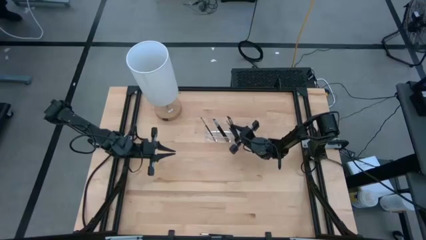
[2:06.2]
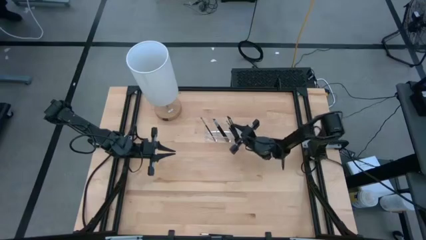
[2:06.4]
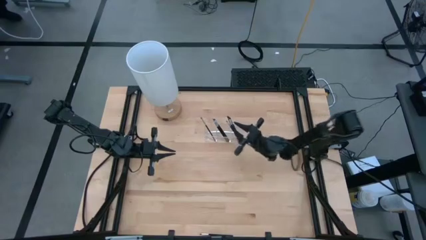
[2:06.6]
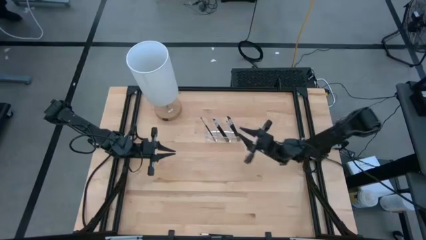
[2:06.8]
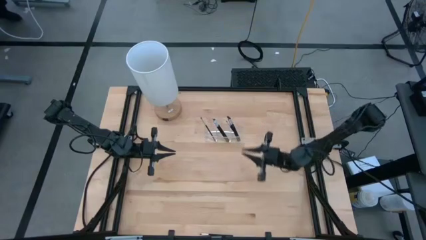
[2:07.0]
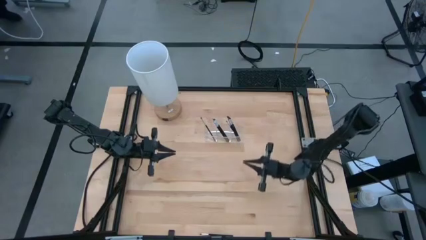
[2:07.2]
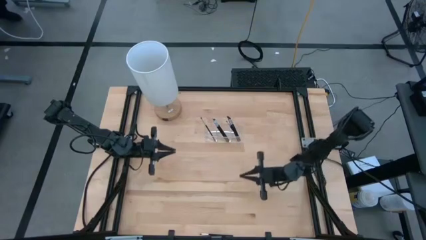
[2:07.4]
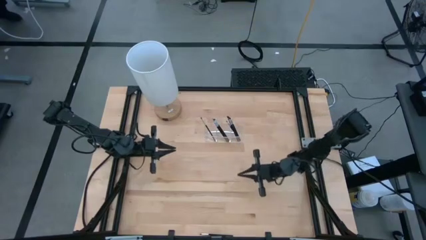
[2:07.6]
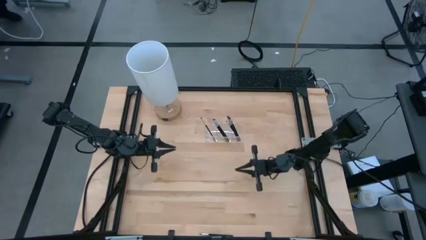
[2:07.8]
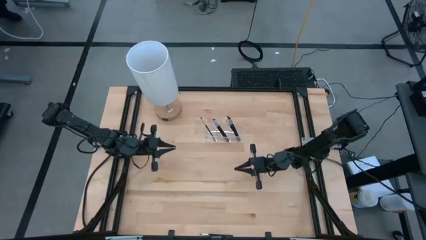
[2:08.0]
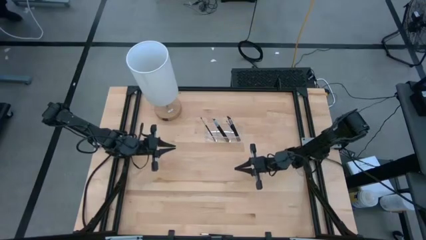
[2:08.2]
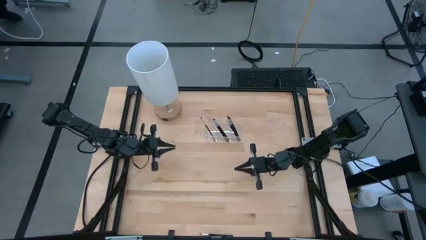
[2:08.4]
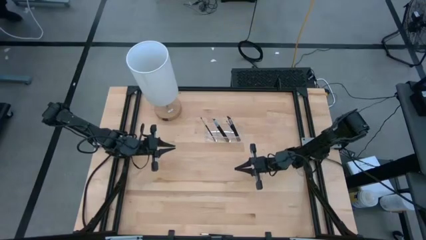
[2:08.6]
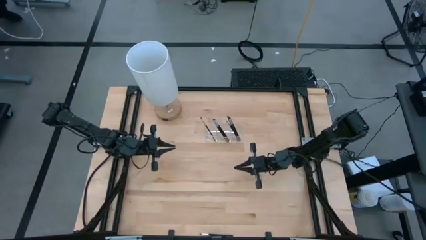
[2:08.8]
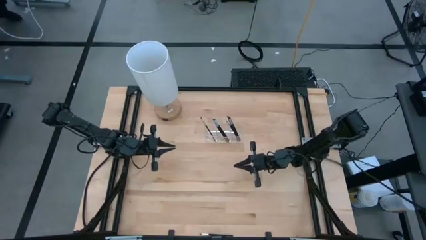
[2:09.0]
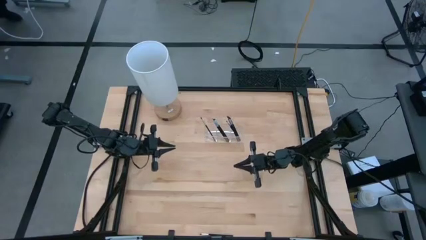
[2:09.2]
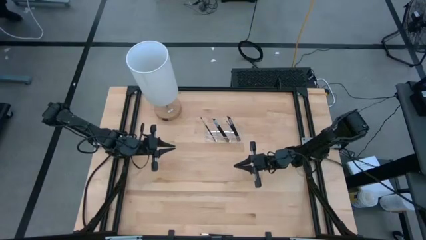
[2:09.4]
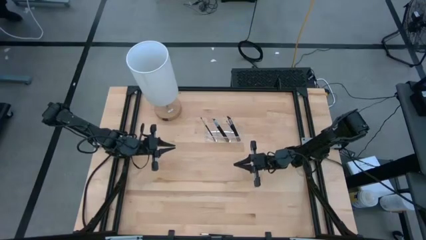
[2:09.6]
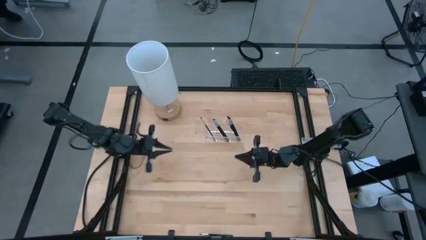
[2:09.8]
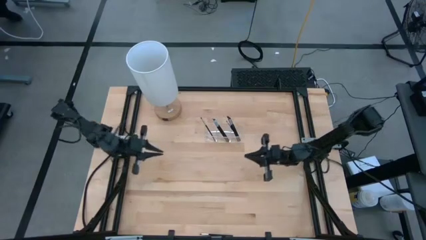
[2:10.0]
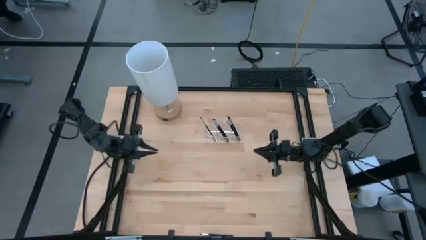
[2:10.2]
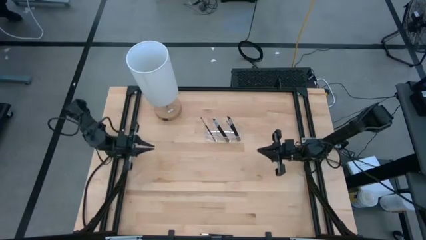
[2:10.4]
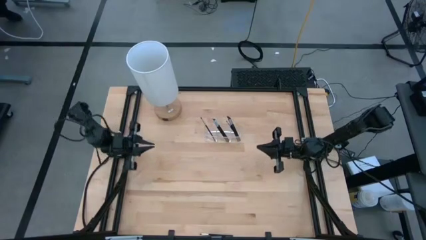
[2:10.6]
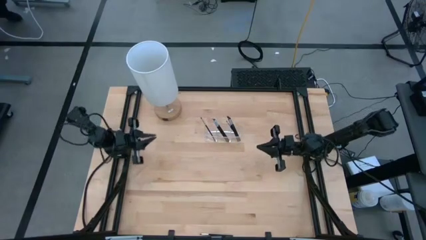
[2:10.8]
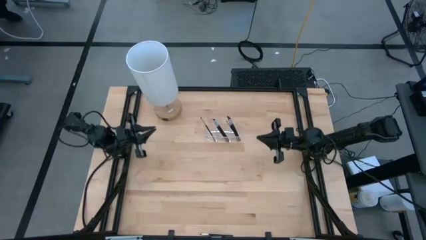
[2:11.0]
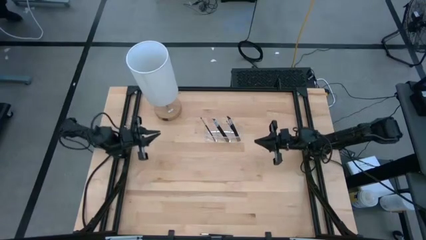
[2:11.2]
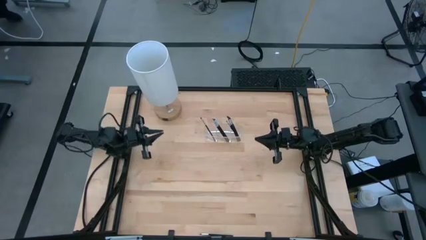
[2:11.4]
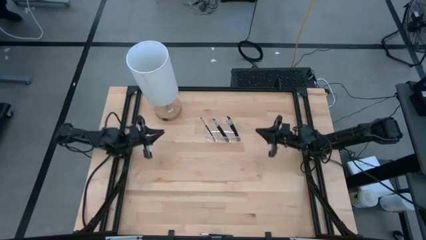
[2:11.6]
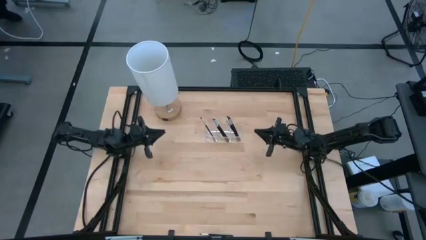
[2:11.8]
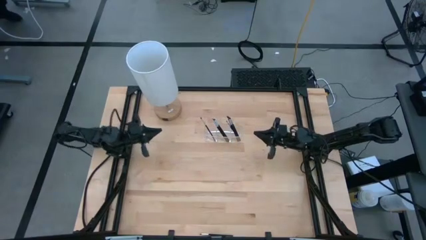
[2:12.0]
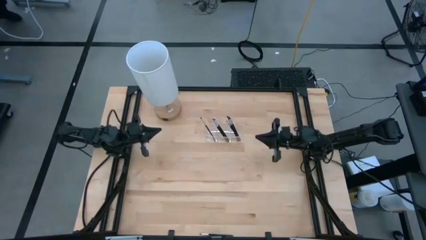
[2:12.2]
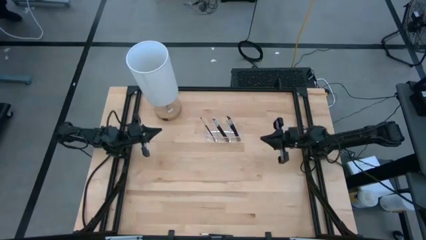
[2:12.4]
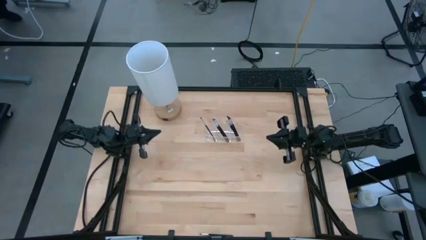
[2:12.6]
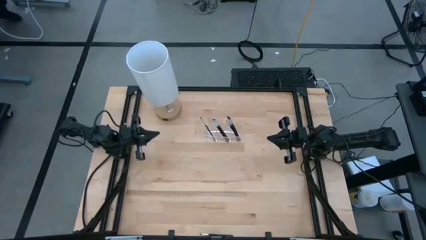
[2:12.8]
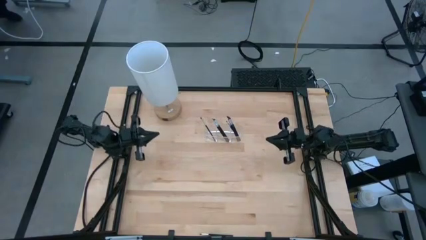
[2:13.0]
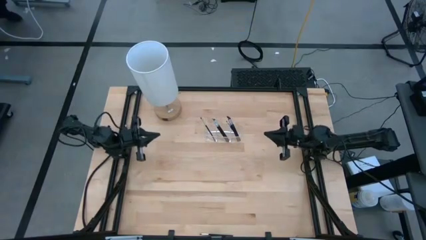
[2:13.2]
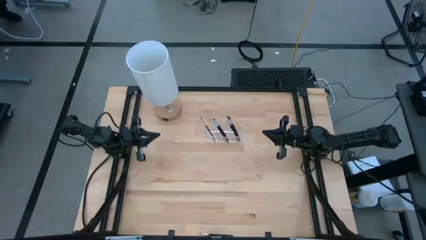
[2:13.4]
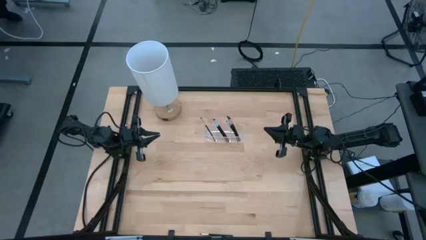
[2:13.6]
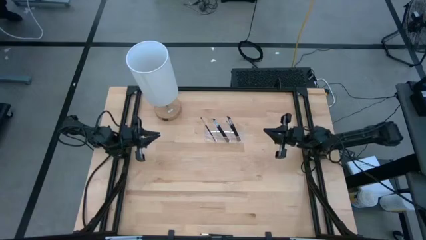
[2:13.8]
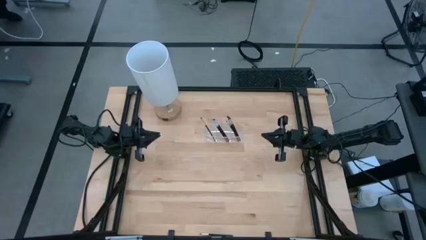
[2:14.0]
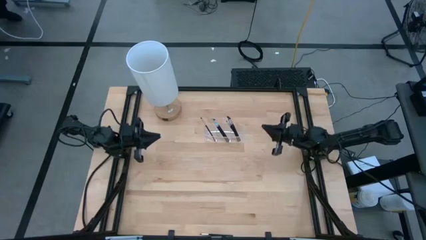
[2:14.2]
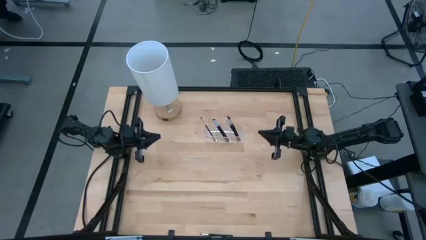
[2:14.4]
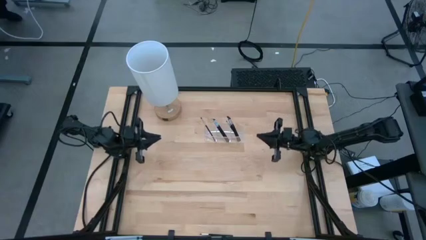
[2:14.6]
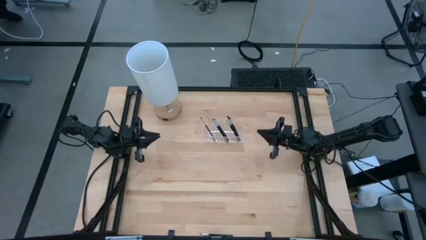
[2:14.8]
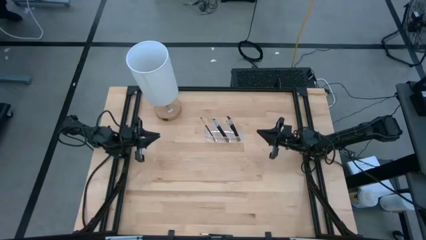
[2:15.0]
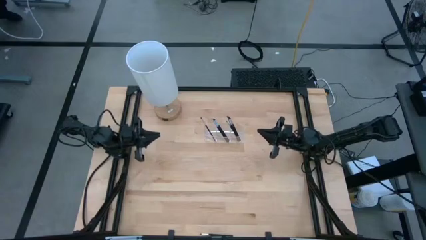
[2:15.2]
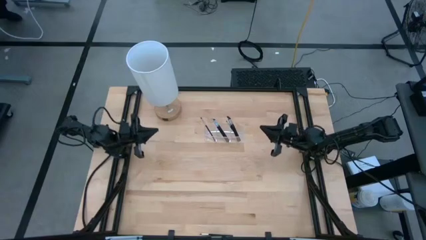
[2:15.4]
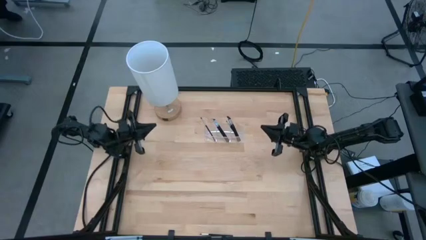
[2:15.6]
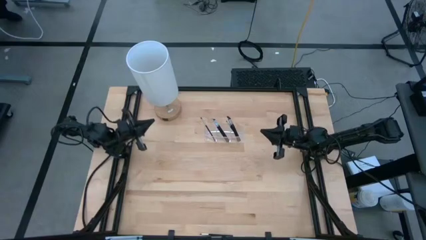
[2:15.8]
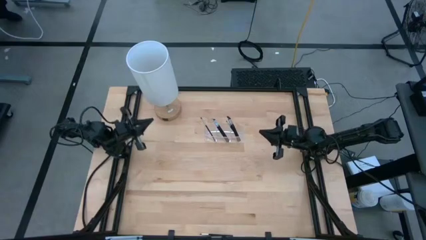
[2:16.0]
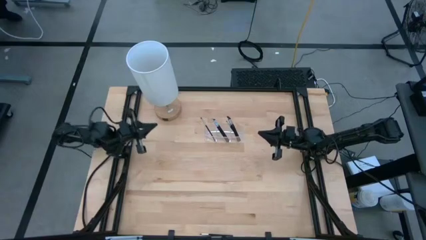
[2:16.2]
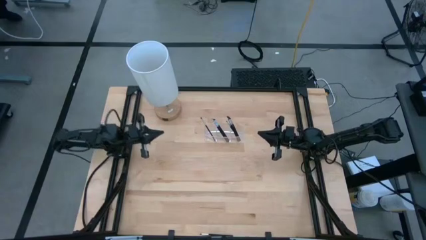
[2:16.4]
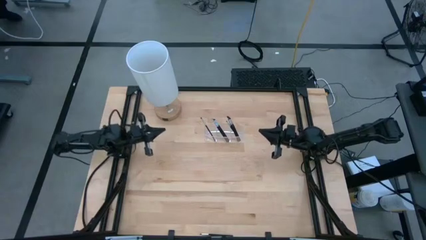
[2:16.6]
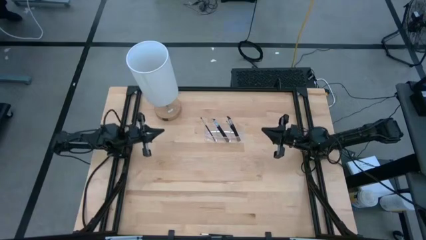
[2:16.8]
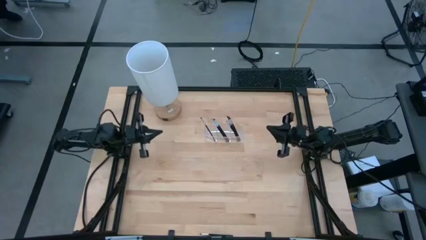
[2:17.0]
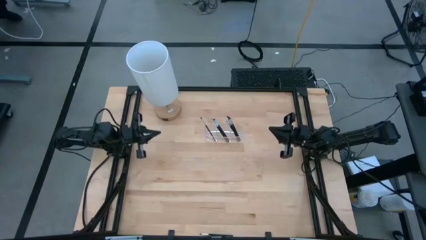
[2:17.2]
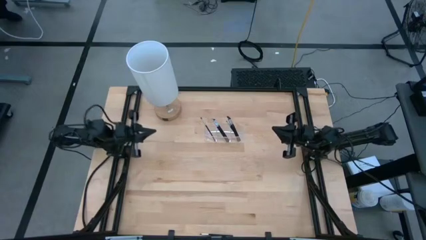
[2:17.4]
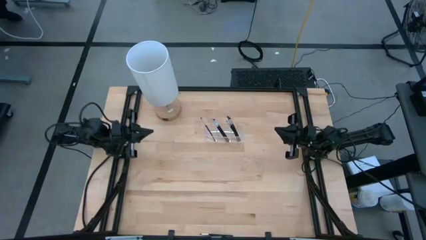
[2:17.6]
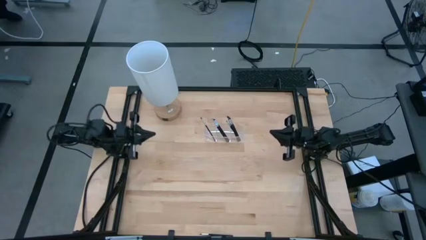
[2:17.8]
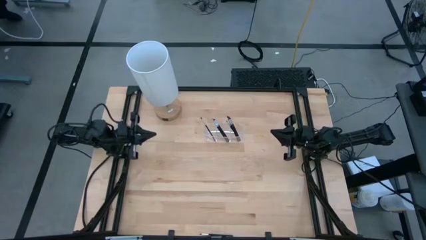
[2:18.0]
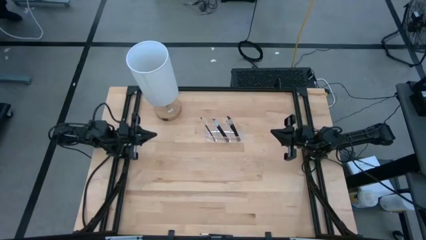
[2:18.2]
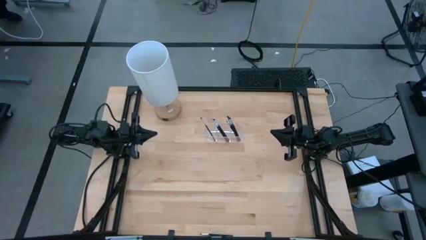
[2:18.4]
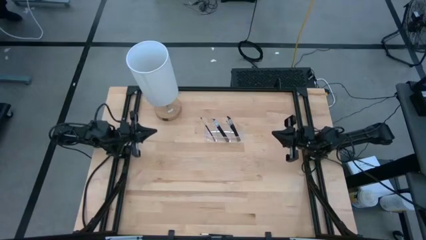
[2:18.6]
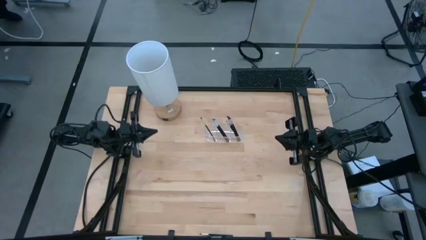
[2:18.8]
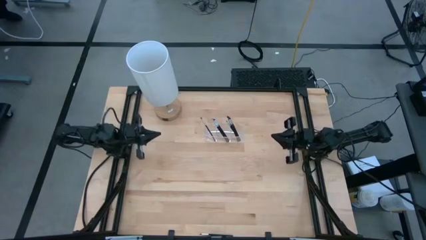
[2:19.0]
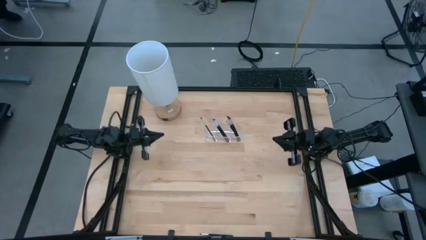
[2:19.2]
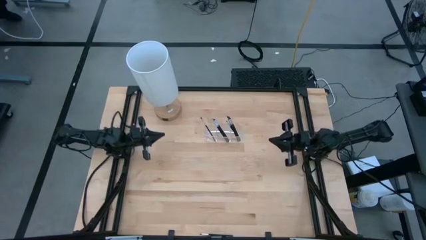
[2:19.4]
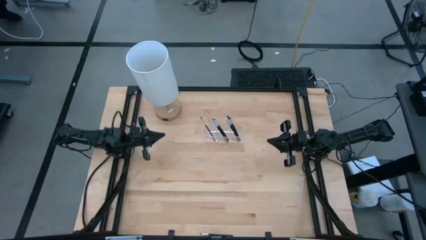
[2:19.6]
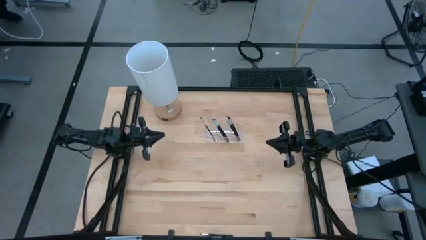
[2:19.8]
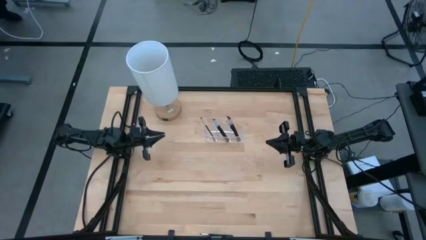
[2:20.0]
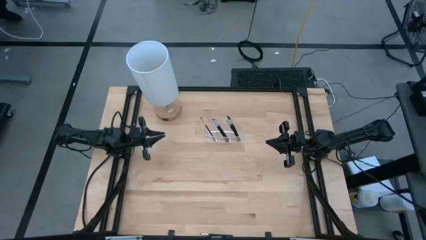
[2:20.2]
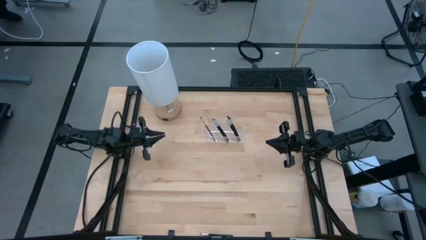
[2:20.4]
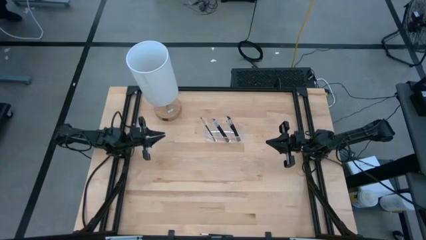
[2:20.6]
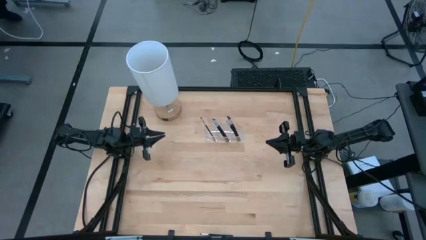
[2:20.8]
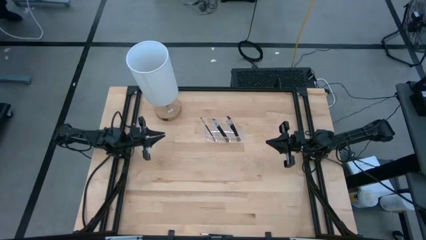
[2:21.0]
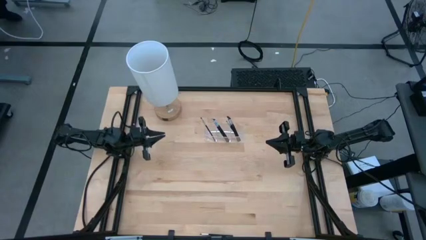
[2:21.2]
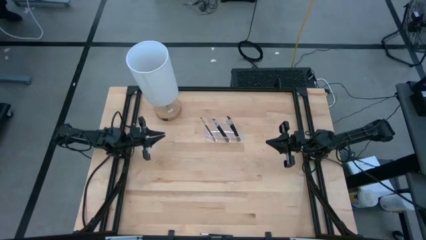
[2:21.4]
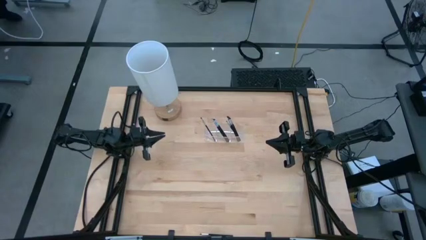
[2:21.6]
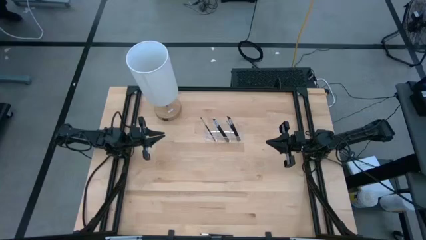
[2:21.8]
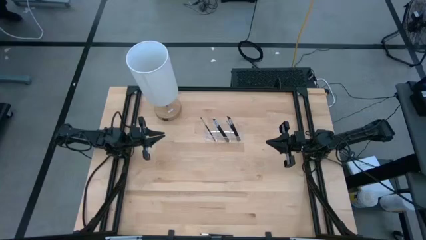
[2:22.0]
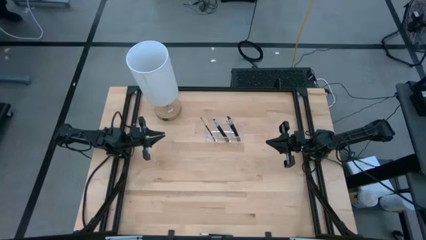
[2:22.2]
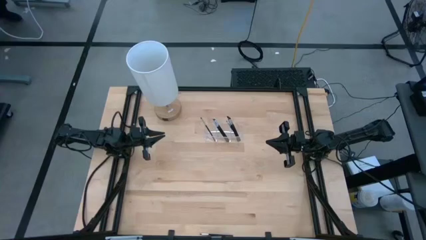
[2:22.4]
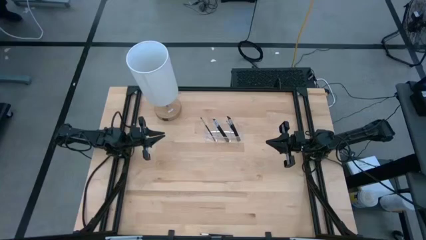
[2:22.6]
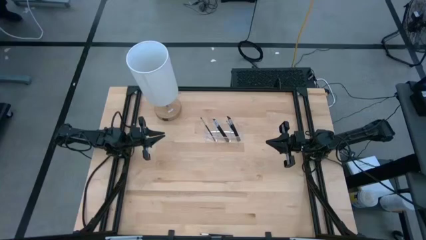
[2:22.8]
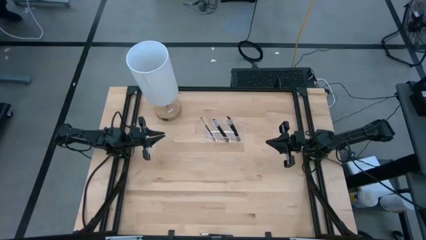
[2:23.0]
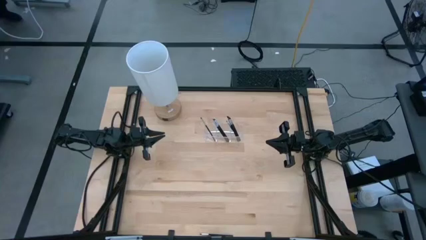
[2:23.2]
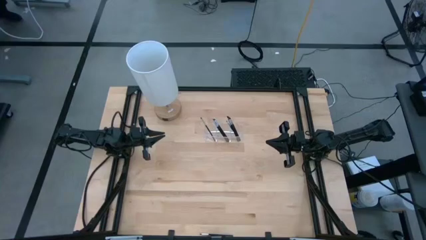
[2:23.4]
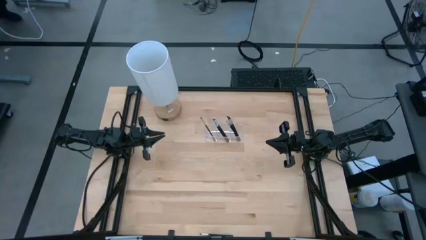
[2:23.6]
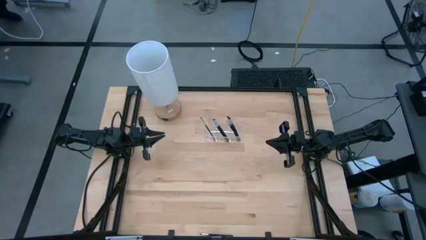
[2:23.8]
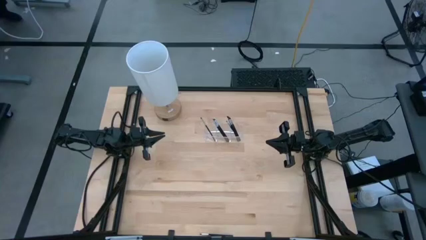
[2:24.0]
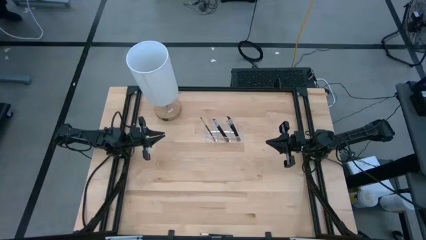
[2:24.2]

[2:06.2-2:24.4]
Task: Put items in baskets/containers
Return to home position
